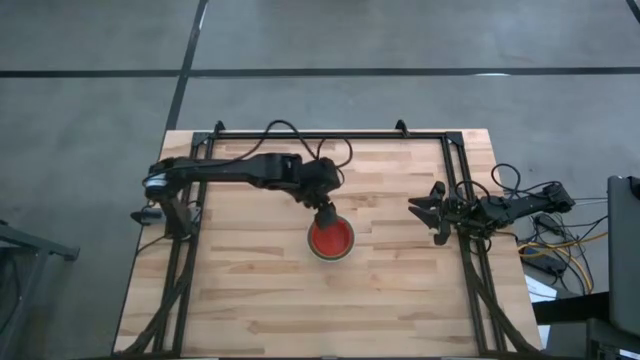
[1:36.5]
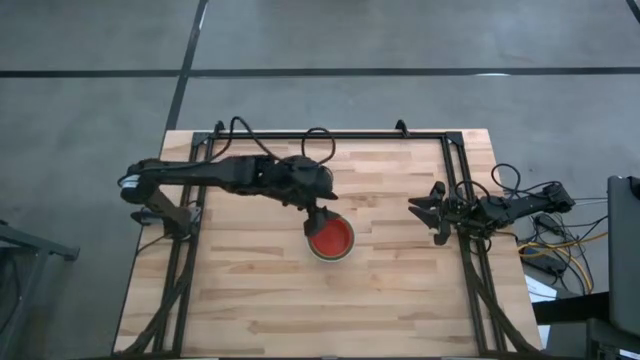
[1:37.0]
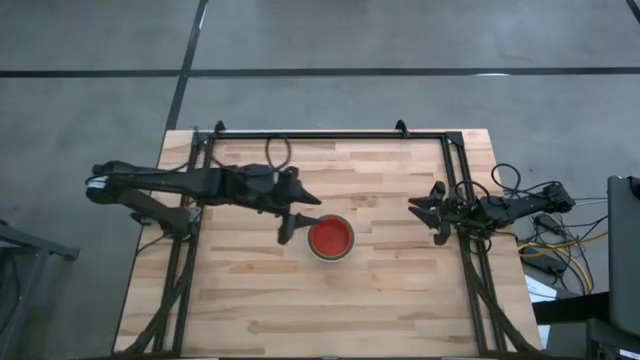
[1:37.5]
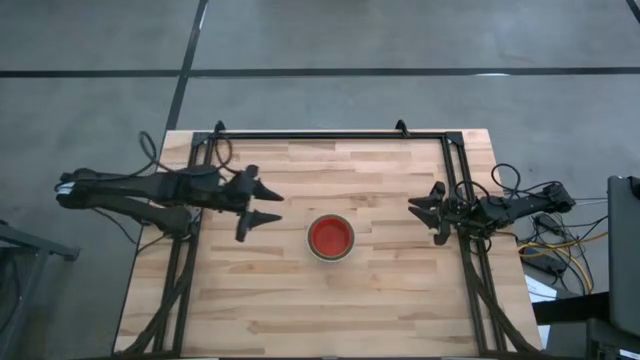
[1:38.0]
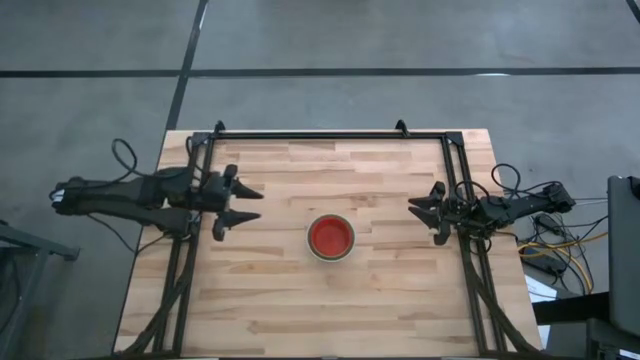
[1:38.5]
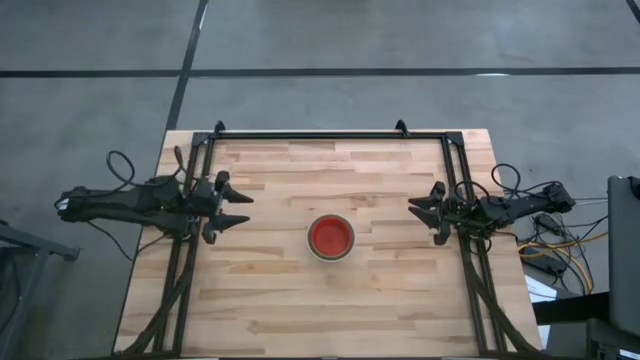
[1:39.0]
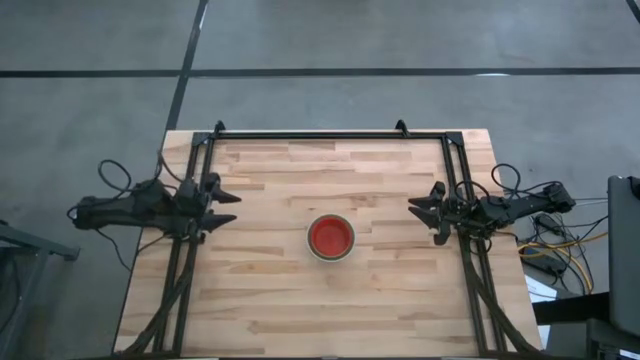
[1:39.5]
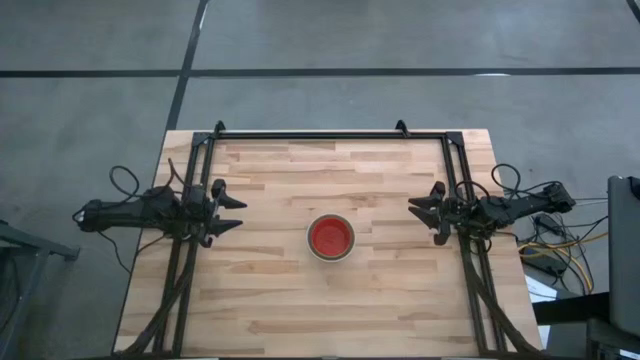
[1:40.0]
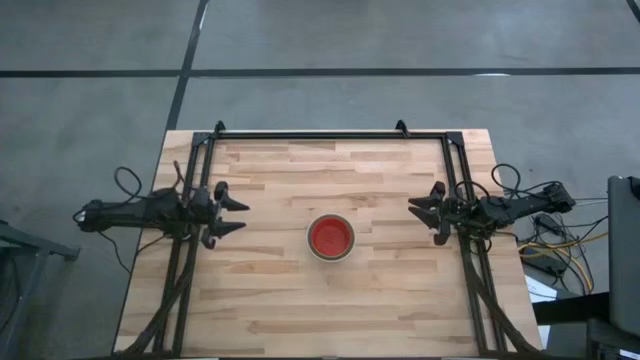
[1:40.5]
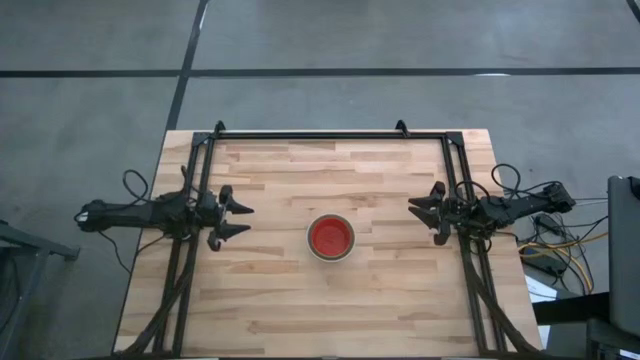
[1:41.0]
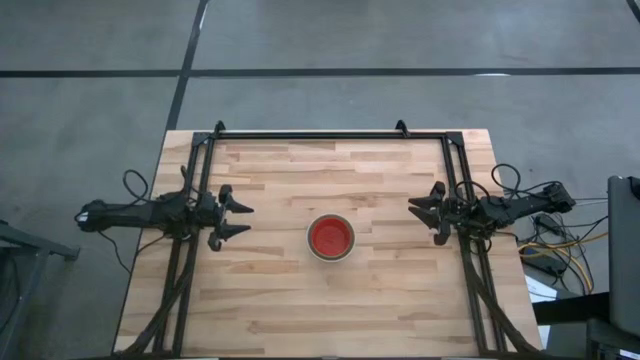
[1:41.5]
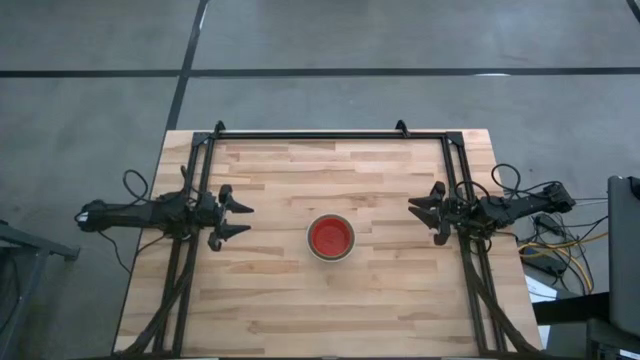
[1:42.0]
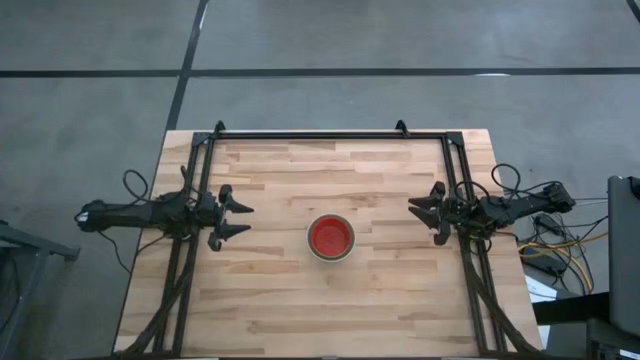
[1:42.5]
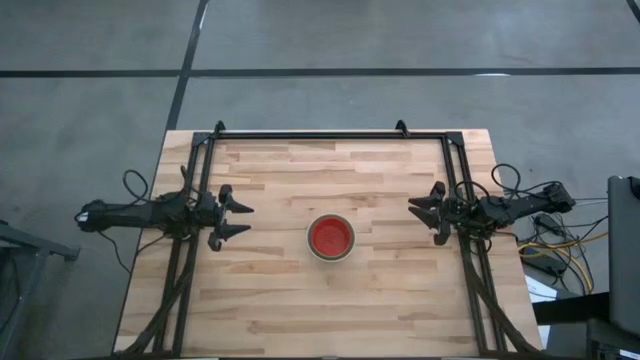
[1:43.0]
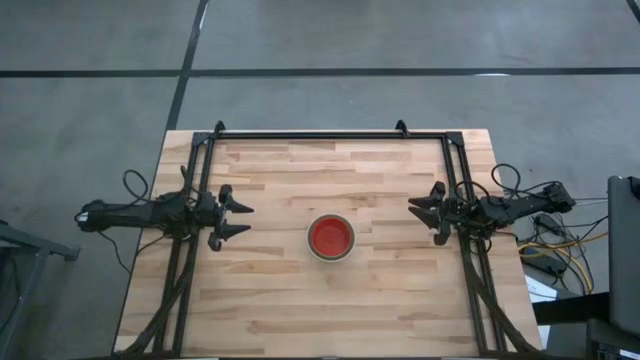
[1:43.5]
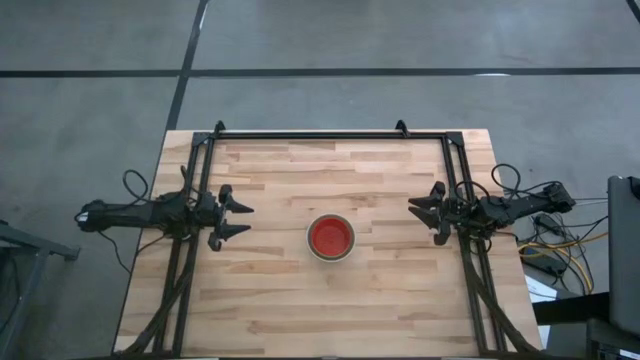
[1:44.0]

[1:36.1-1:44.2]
Return to Home Position

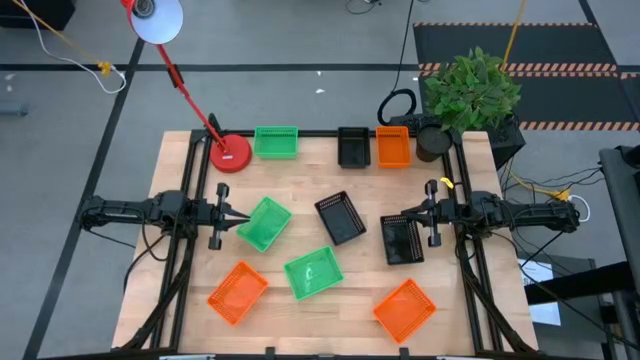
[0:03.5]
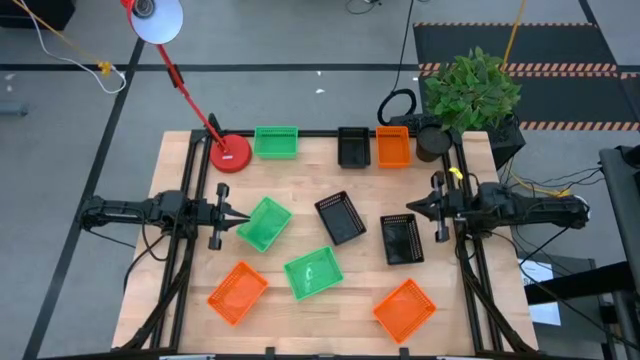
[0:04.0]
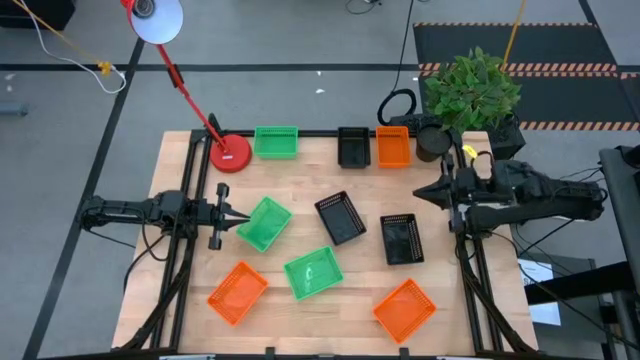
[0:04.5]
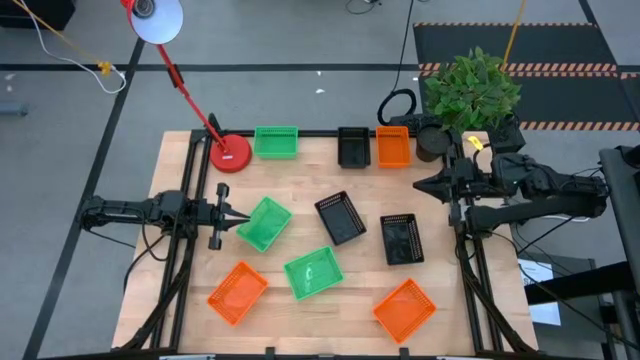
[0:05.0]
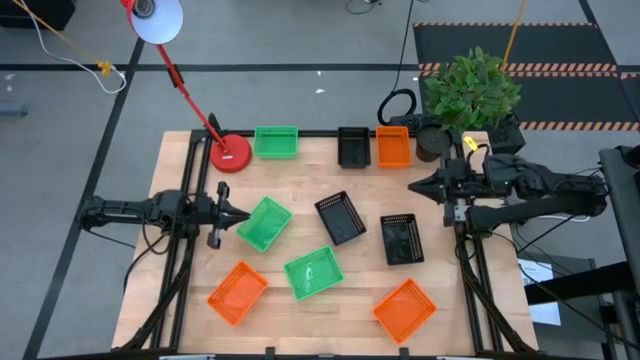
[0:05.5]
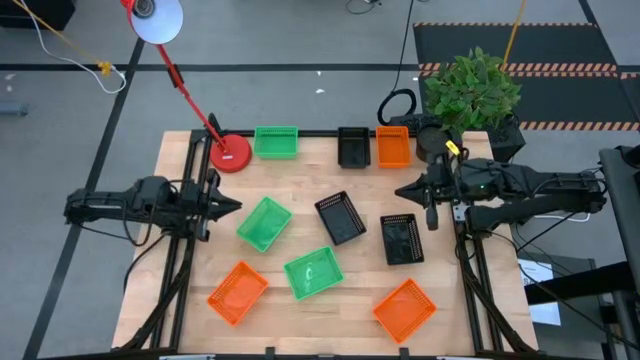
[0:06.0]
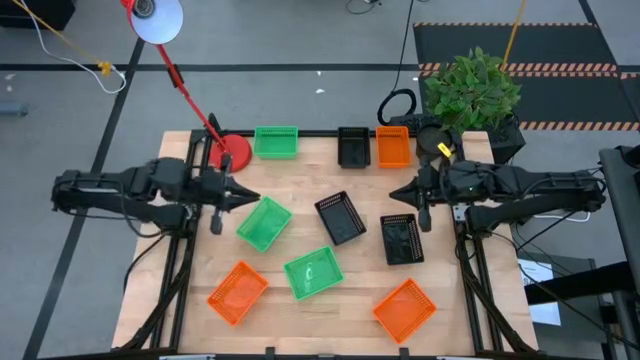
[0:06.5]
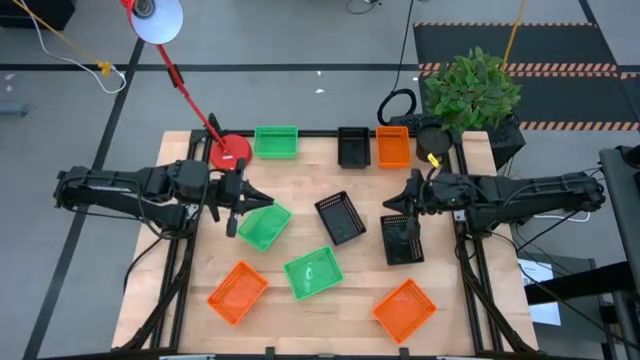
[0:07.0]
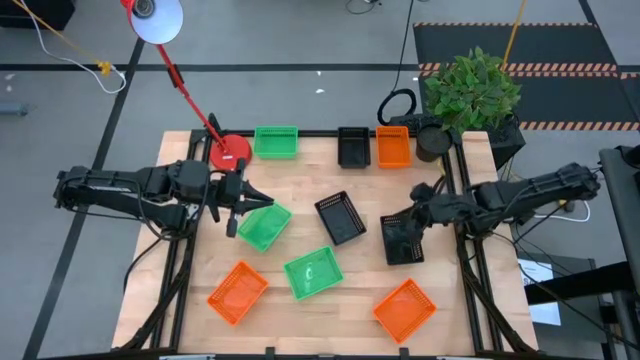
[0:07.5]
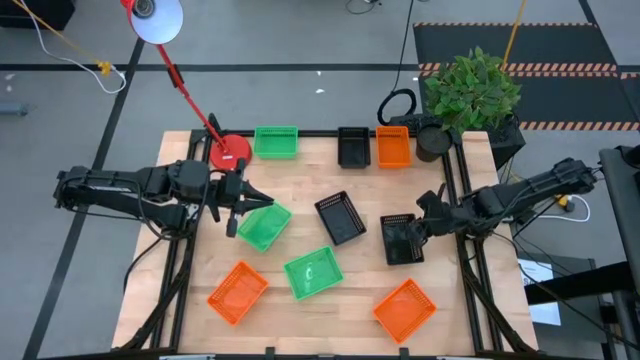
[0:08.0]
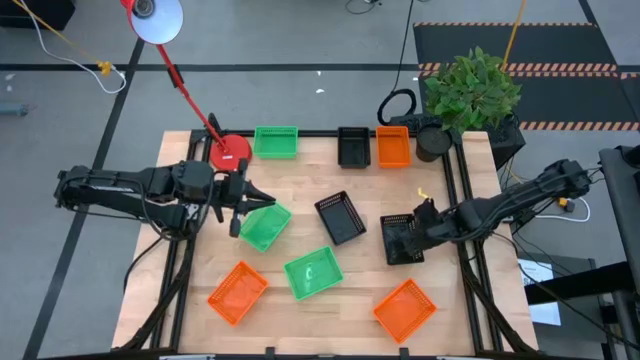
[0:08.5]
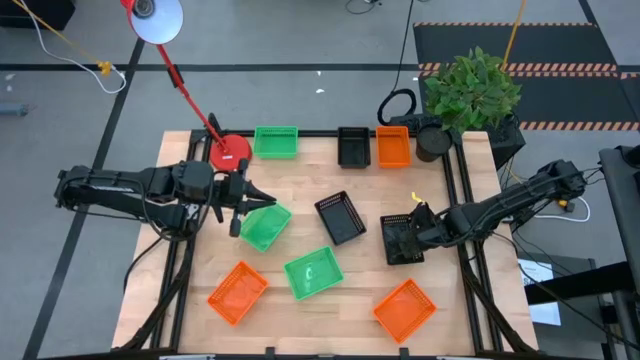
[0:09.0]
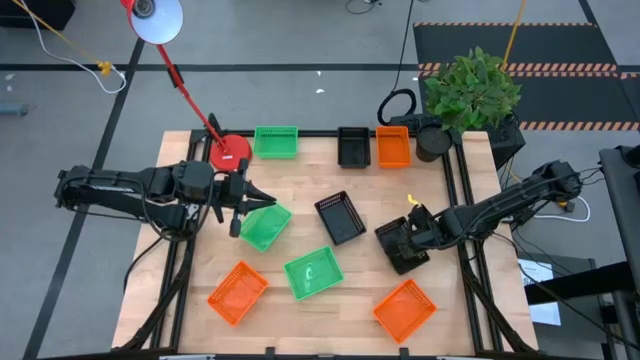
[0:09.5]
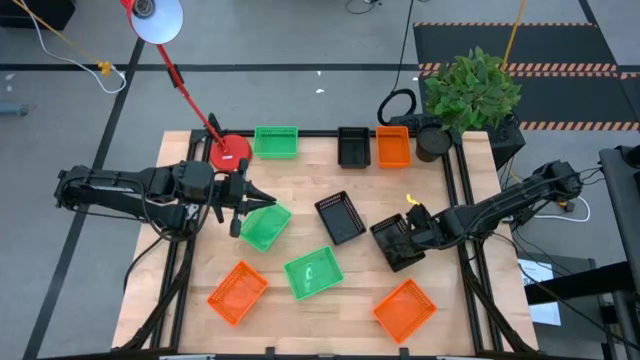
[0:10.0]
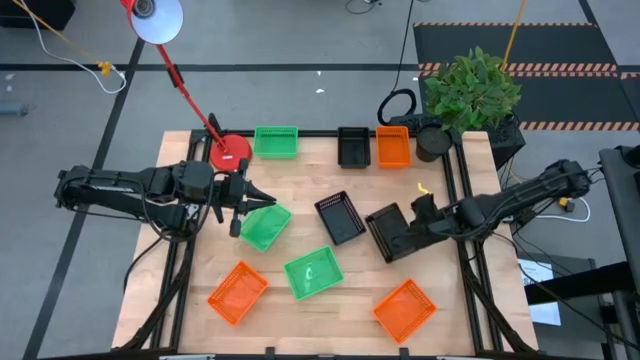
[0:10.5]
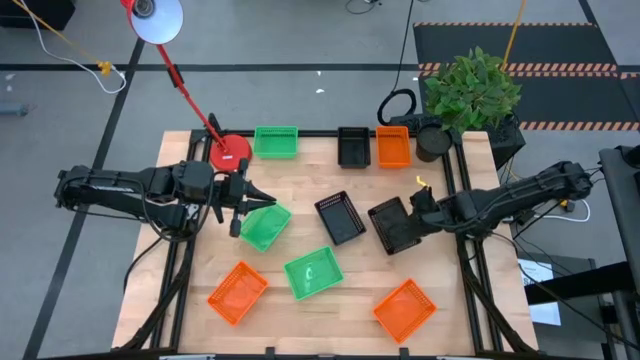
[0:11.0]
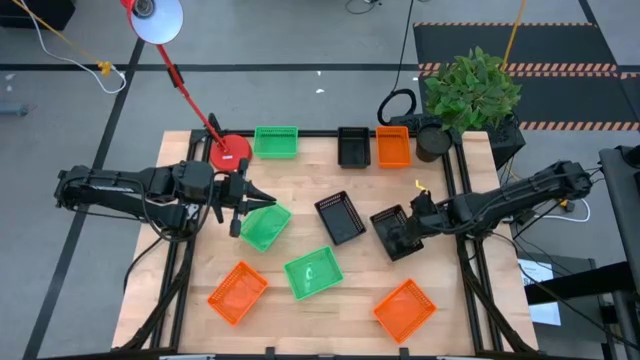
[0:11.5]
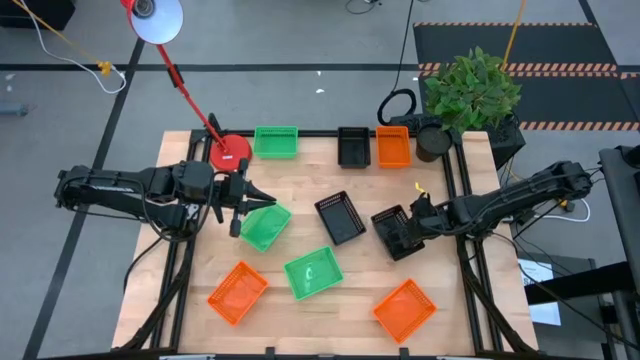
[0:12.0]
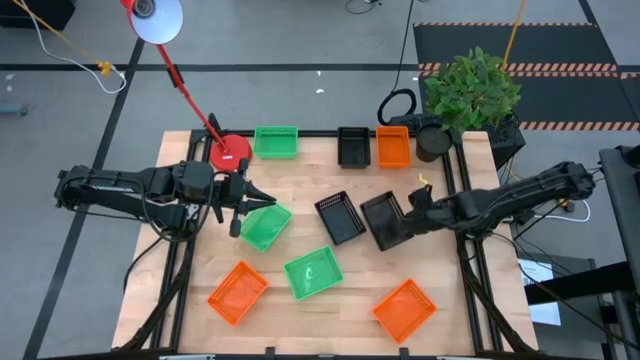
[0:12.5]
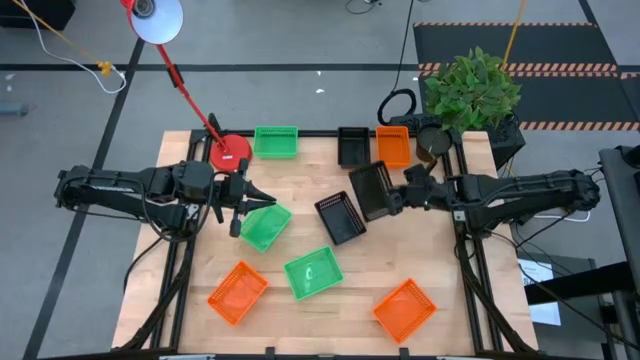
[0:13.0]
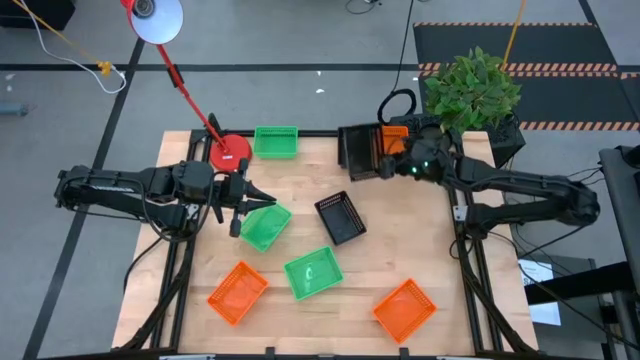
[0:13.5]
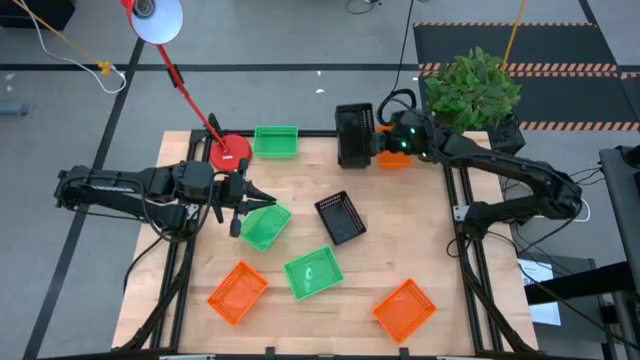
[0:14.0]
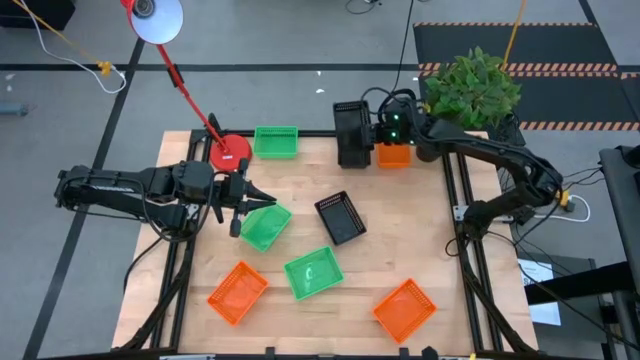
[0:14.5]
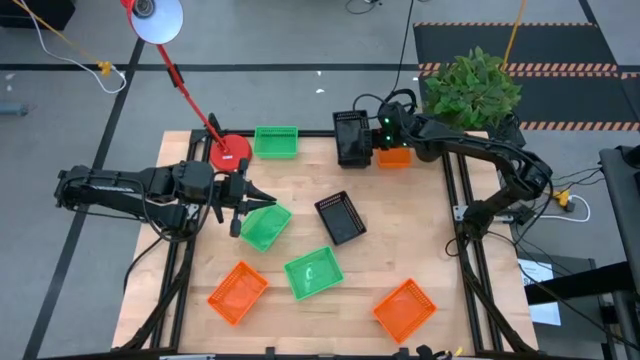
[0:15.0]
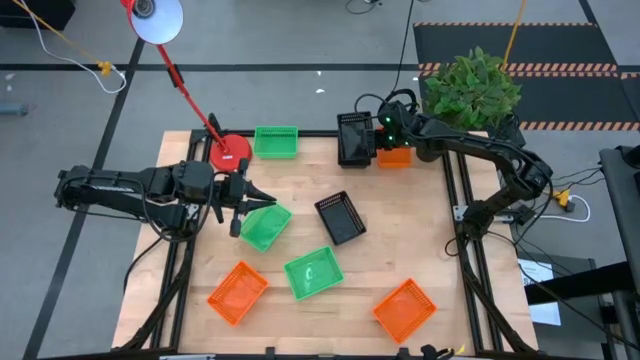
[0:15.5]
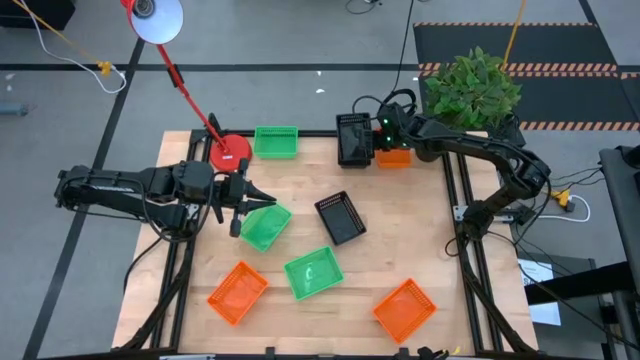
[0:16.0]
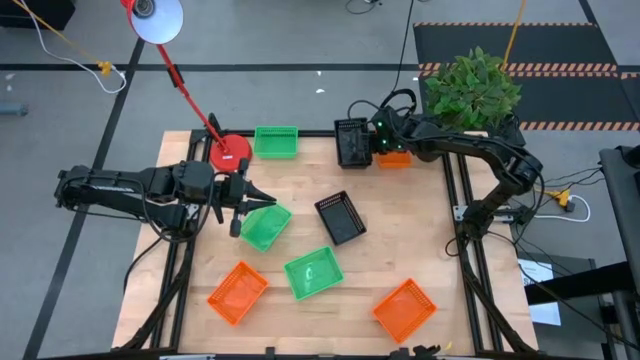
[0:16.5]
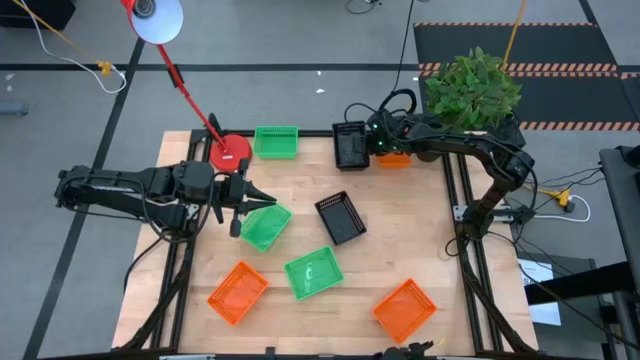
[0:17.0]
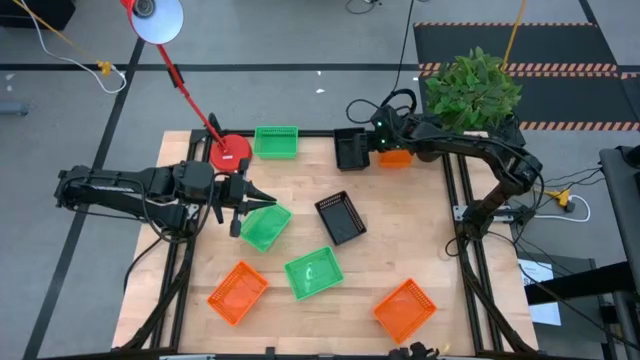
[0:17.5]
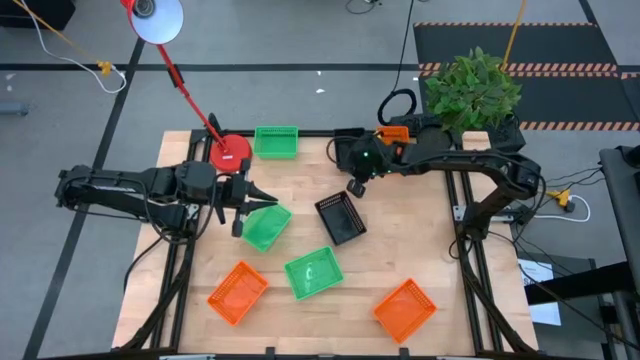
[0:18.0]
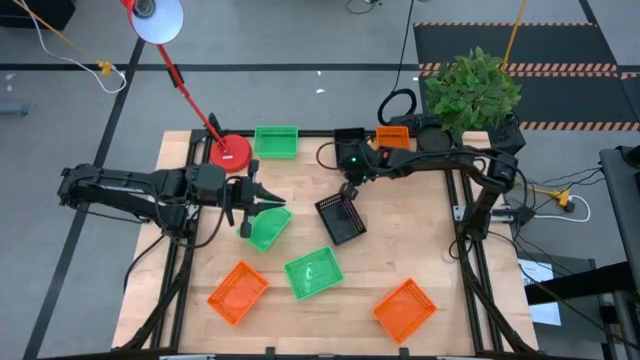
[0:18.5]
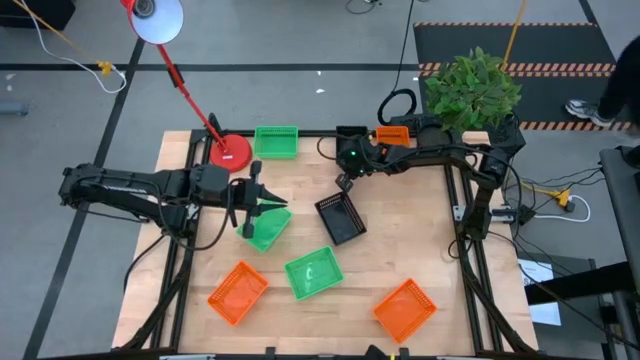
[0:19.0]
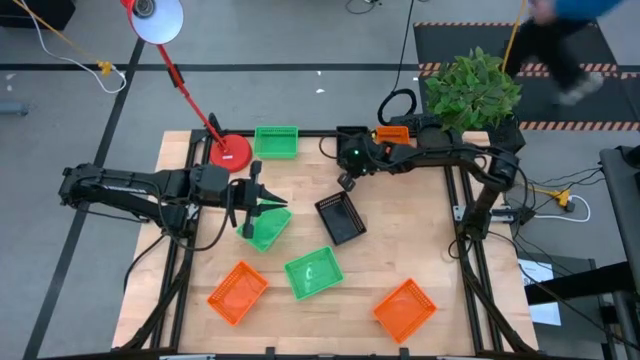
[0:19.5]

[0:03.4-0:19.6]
Stack the bottom right black bin on the top black bin
